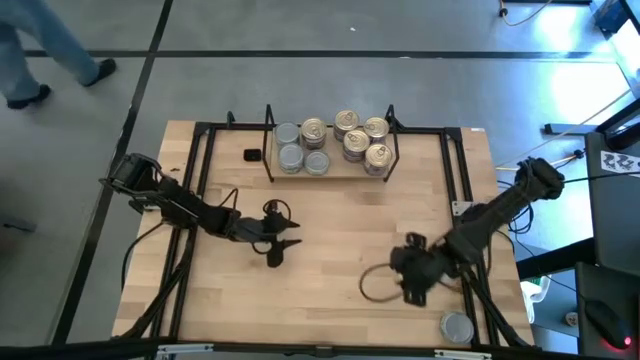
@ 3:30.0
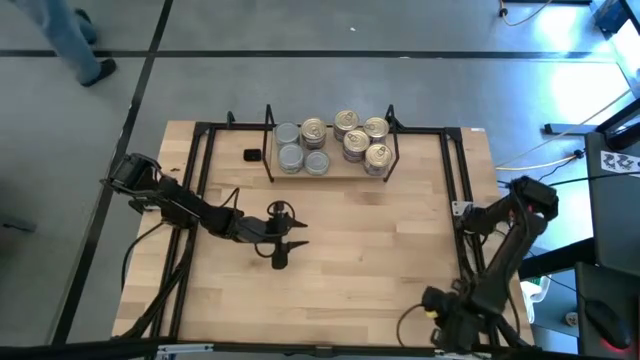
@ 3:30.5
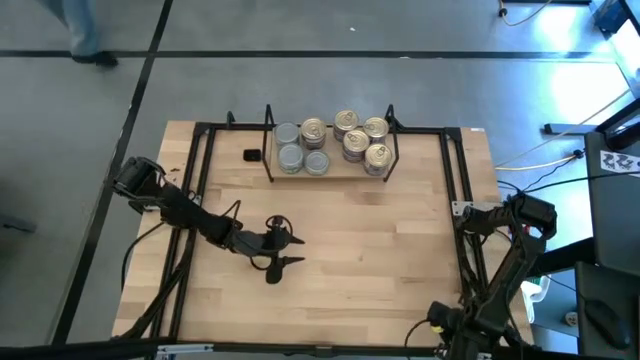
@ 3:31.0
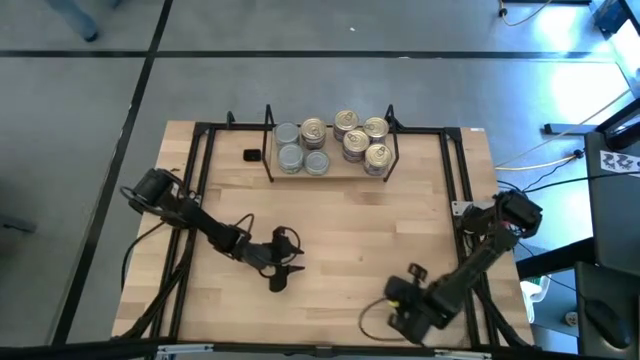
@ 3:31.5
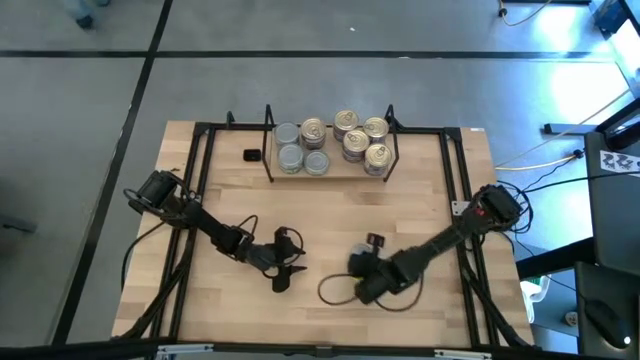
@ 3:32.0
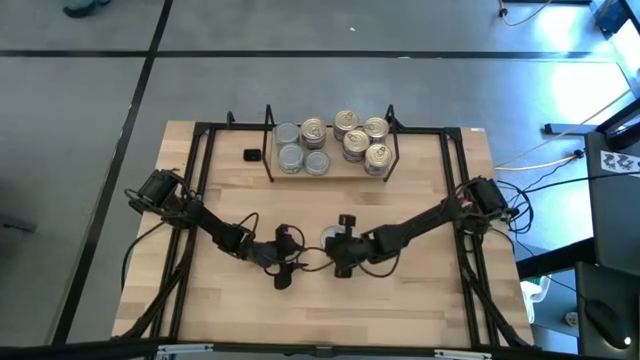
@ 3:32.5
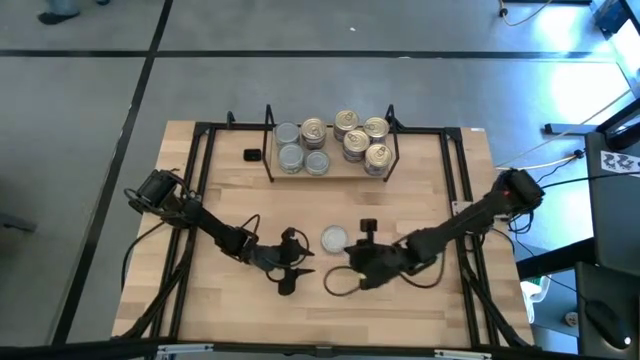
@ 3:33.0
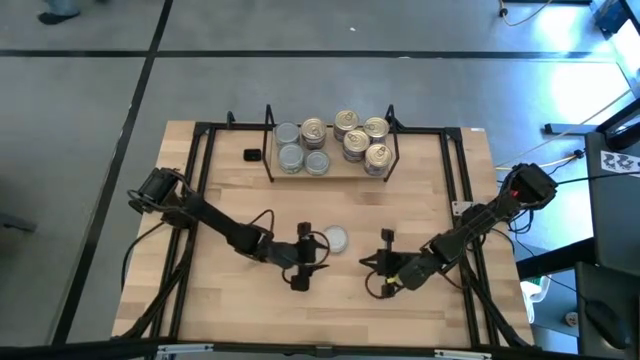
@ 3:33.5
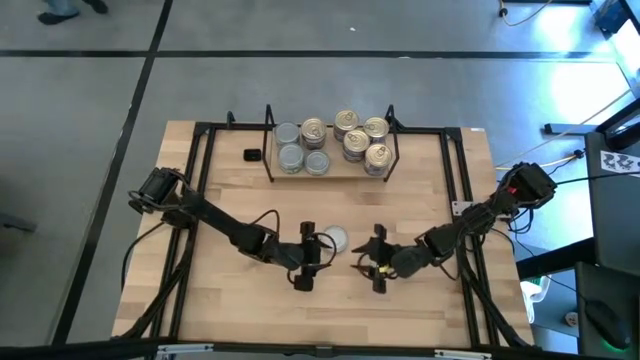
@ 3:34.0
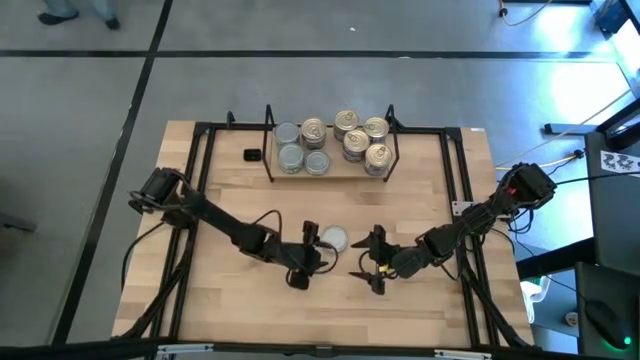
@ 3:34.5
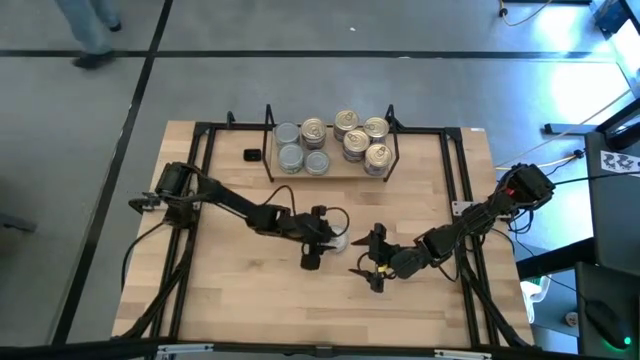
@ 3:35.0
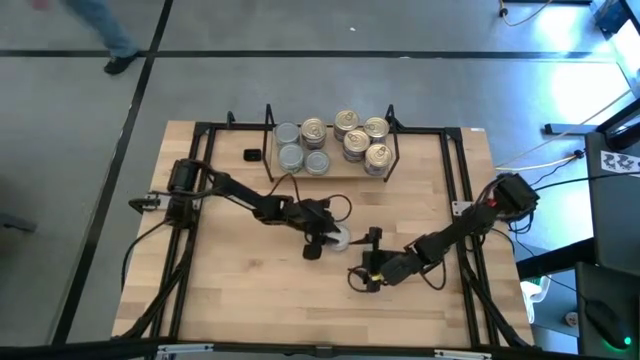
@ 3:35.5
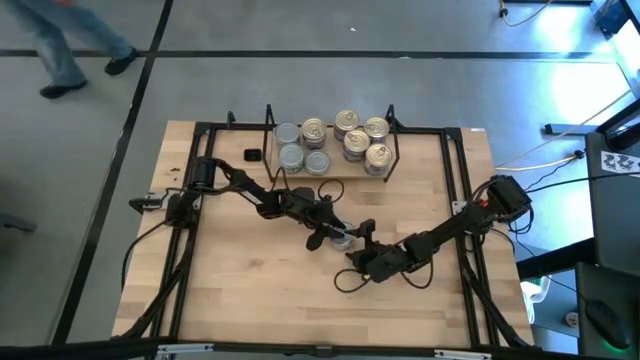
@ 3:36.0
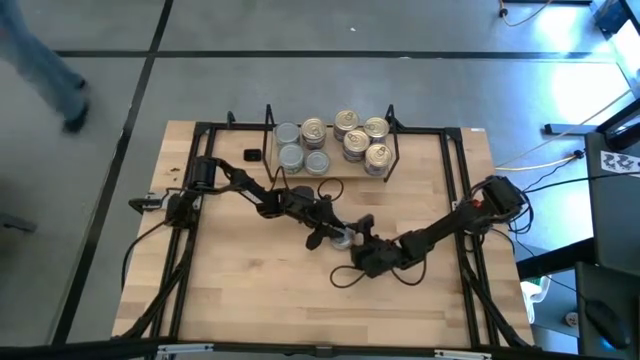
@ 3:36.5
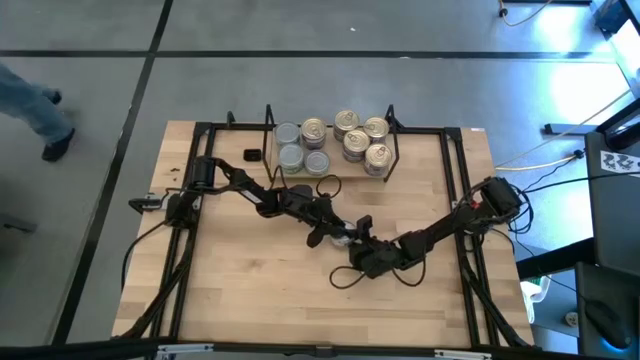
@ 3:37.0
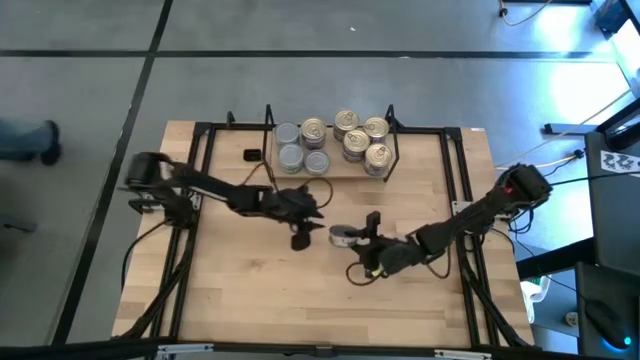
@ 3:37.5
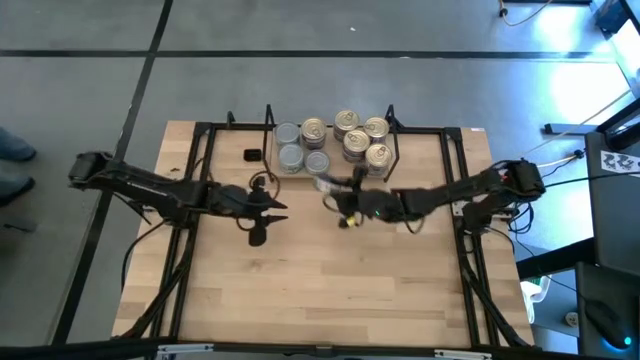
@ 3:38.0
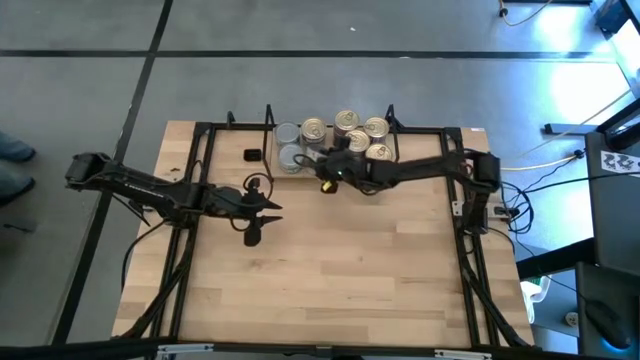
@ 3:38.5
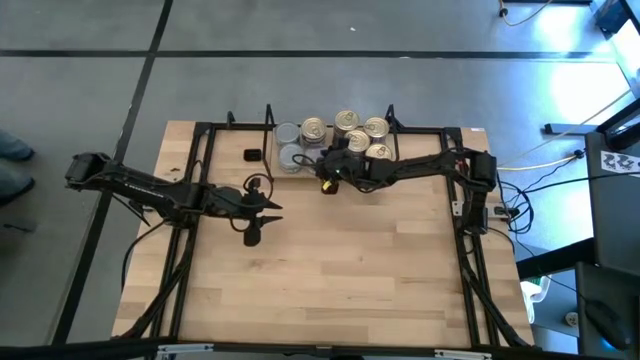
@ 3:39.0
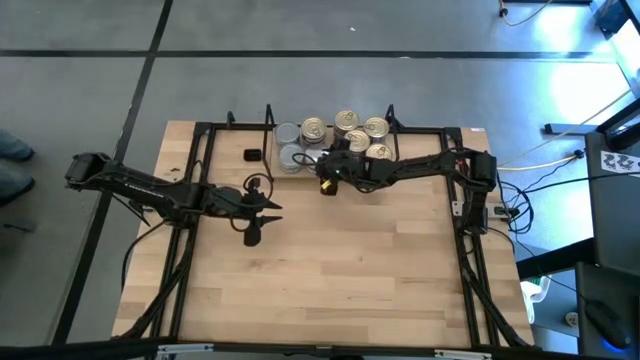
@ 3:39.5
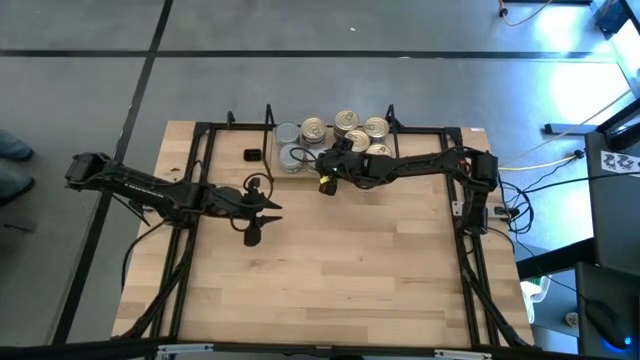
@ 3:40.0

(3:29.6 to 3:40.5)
Task: Stack canned seafood by type on shelf
Stack the green tuna can on top of the other green tuna can on the shelf

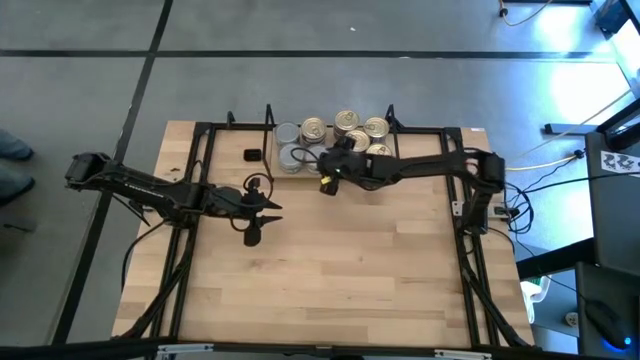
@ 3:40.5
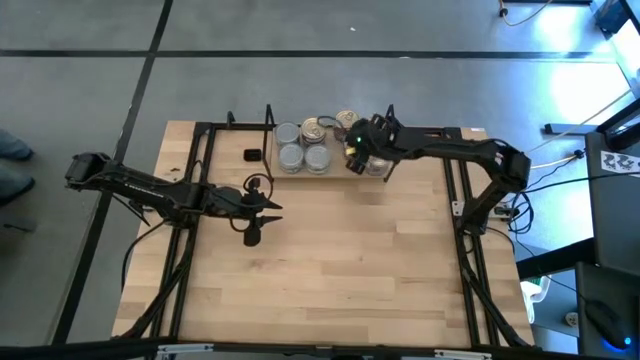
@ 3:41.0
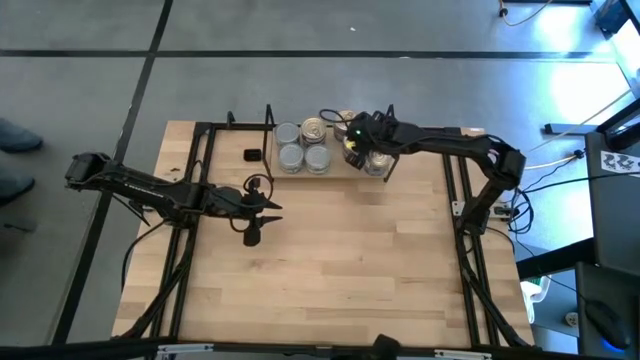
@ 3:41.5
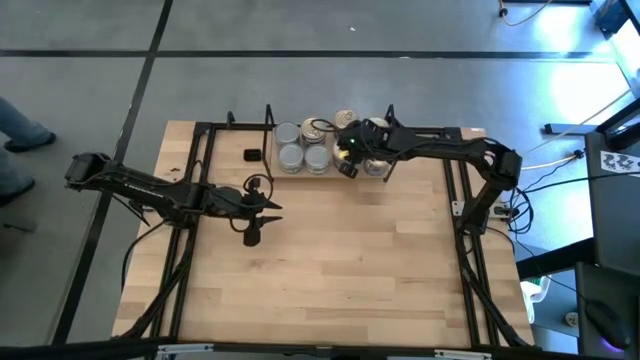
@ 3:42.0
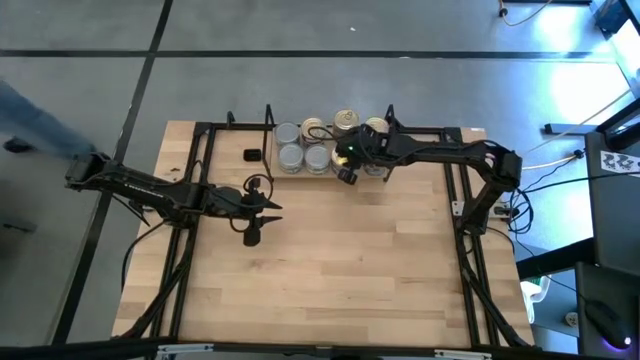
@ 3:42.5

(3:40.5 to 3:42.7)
Adjust the stacked blue-pink tuna can on the shelf

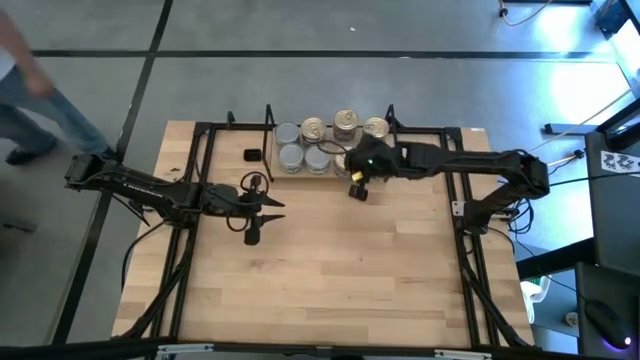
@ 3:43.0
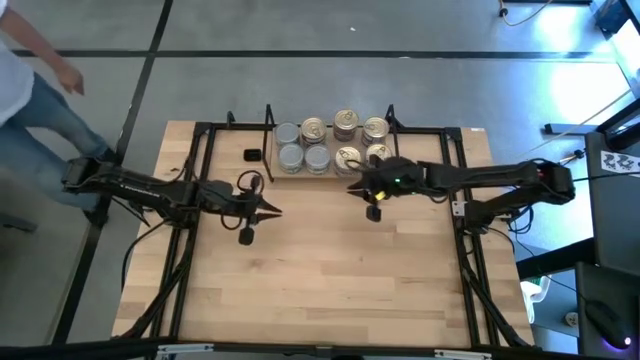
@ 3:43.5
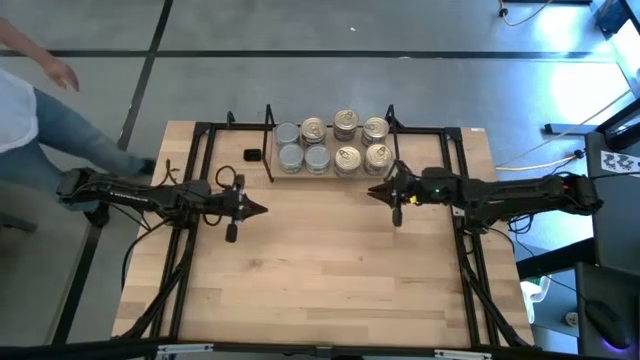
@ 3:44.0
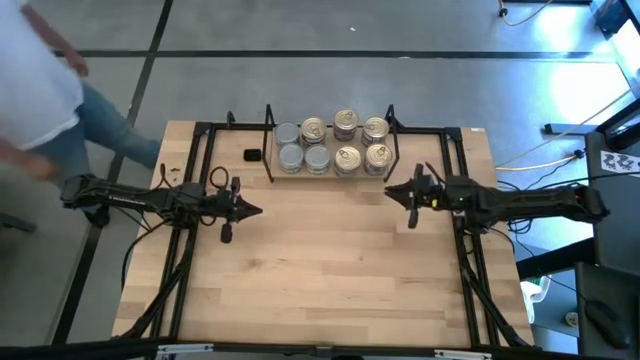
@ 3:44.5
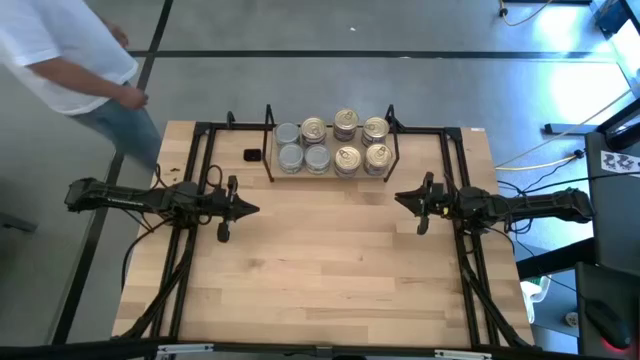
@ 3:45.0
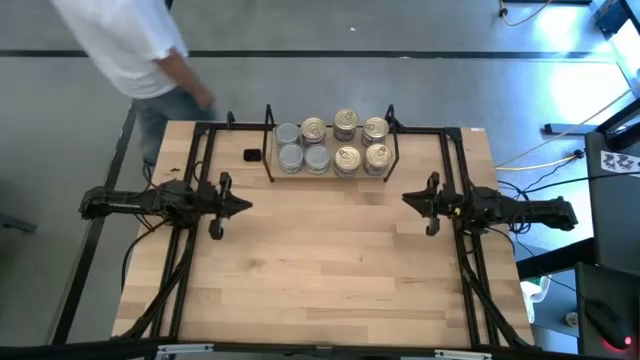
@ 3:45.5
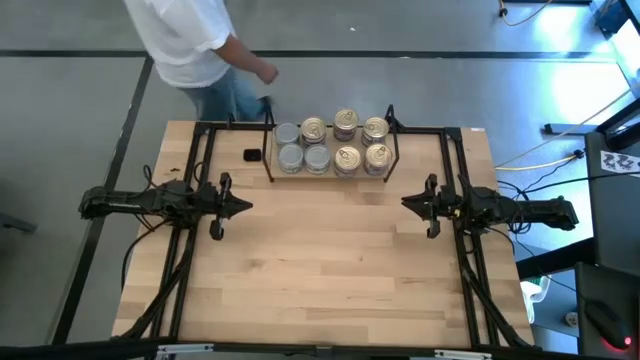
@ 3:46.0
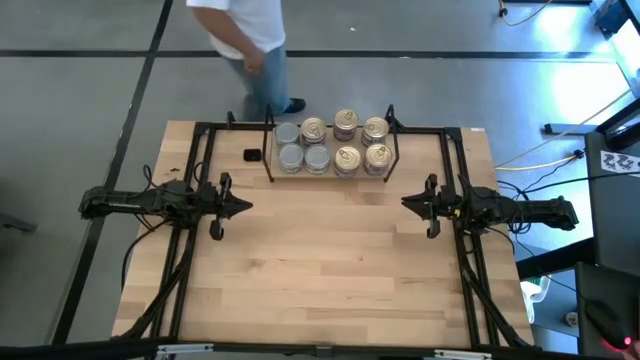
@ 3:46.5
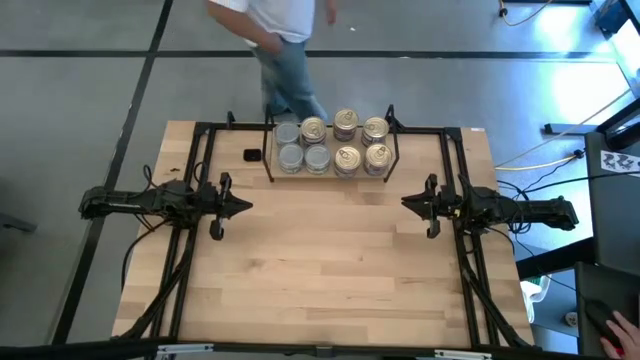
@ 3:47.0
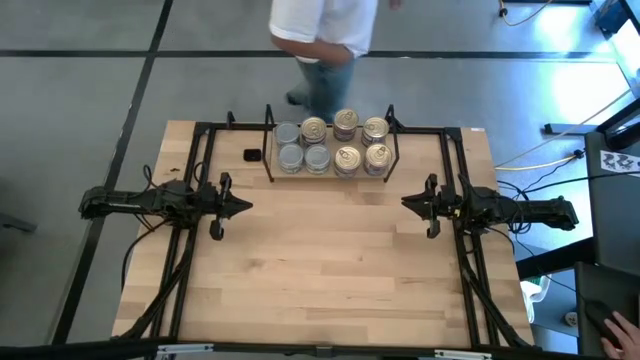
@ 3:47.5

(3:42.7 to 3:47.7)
Return to Home Position

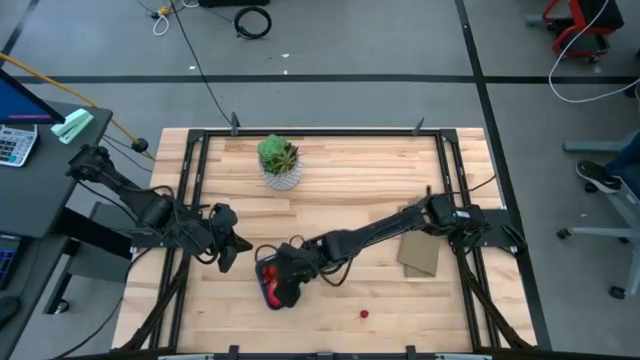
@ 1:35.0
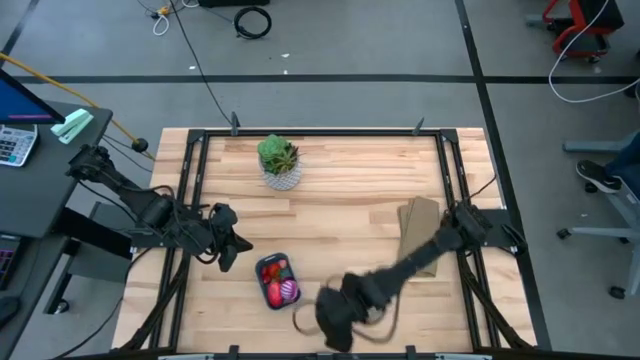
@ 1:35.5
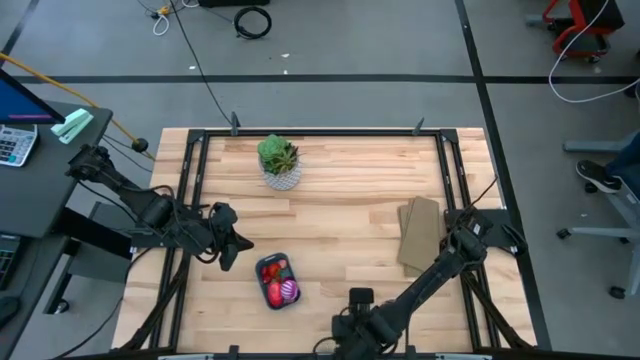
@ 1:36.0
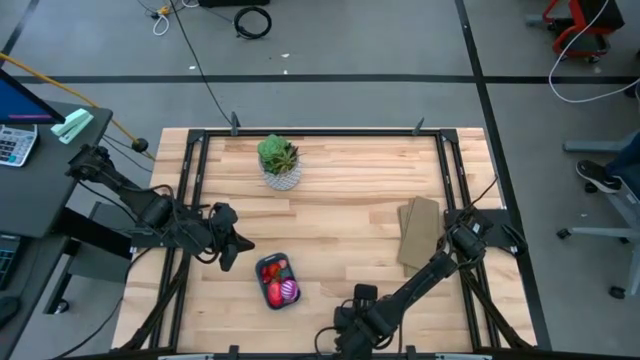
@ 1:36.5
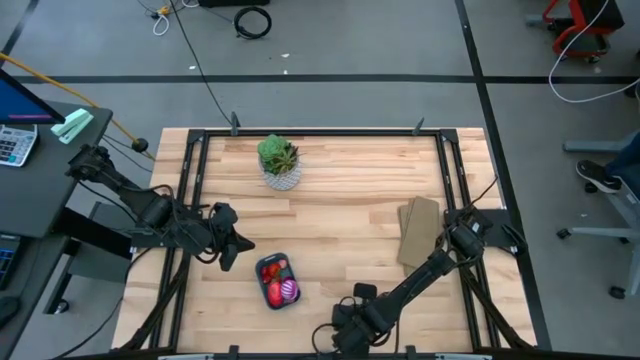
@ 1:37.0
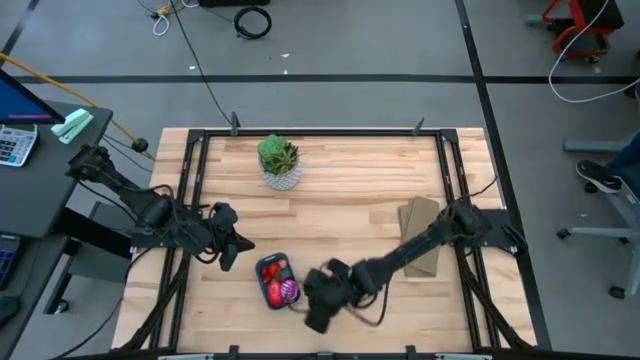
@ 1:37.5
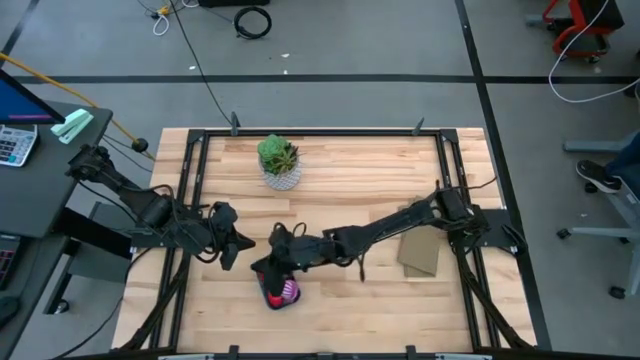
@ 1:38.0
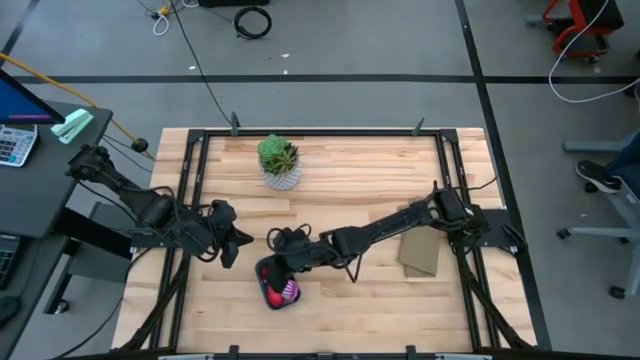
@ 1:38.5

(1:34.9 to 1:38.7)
Task: Pick and placing Produce into tupperware
Put the red cherry into the bin
